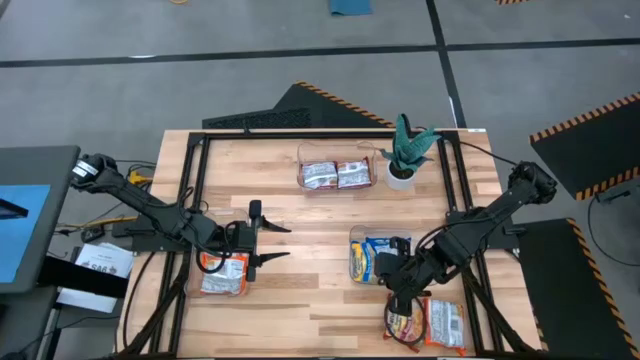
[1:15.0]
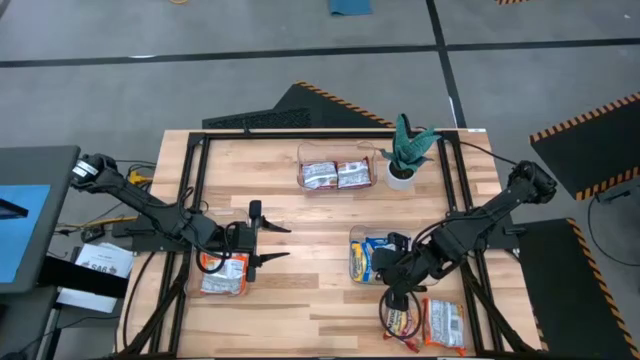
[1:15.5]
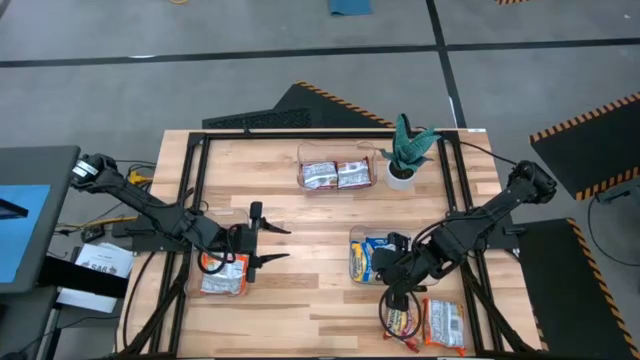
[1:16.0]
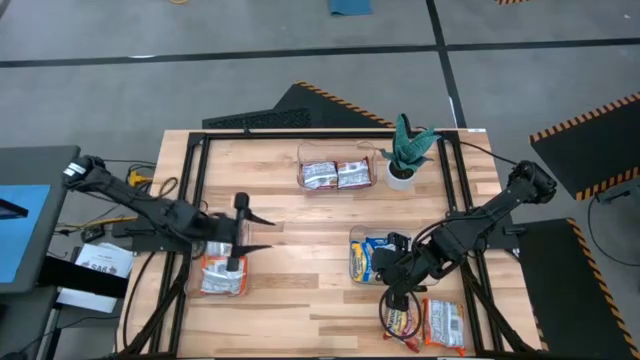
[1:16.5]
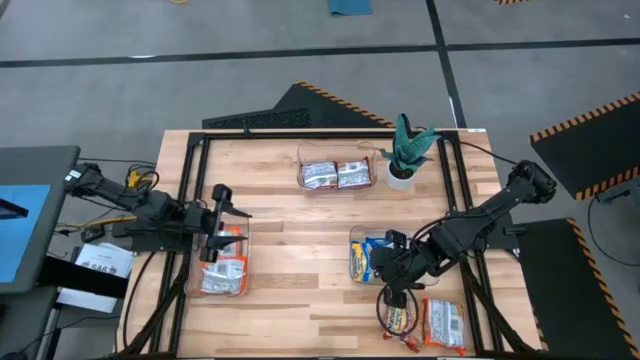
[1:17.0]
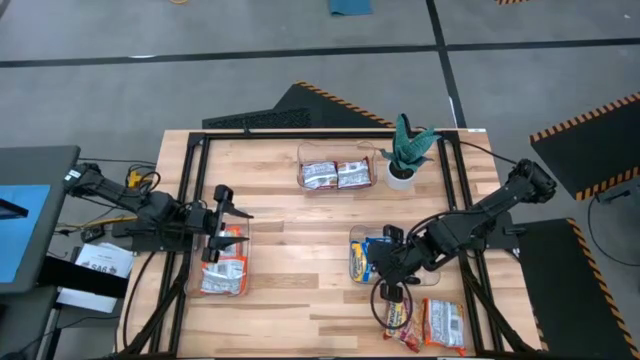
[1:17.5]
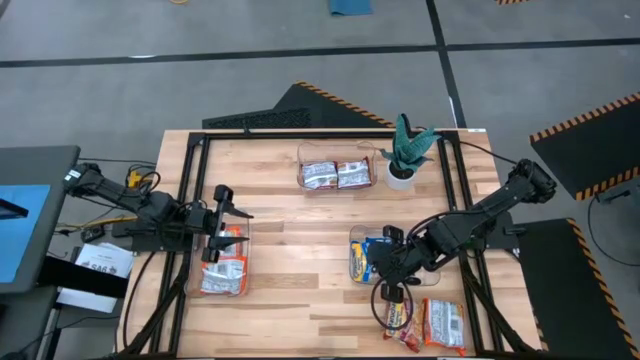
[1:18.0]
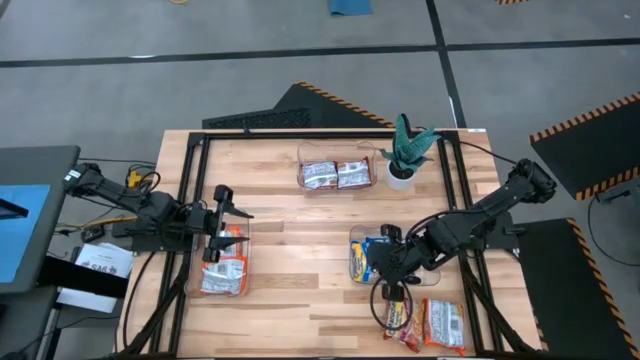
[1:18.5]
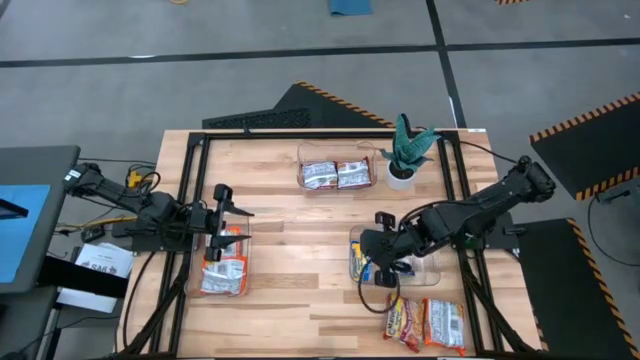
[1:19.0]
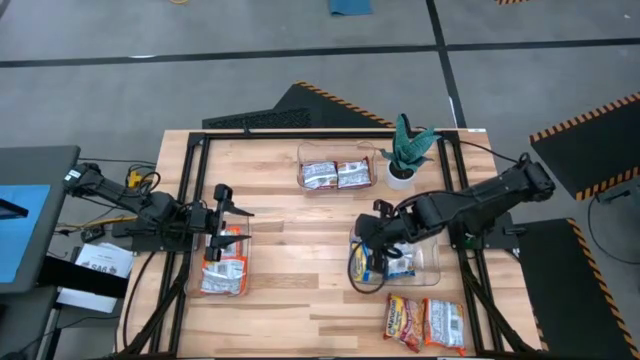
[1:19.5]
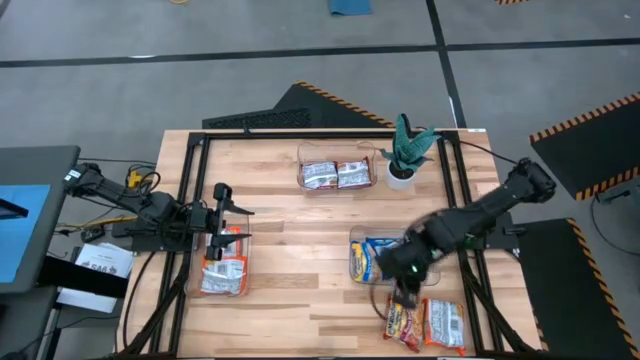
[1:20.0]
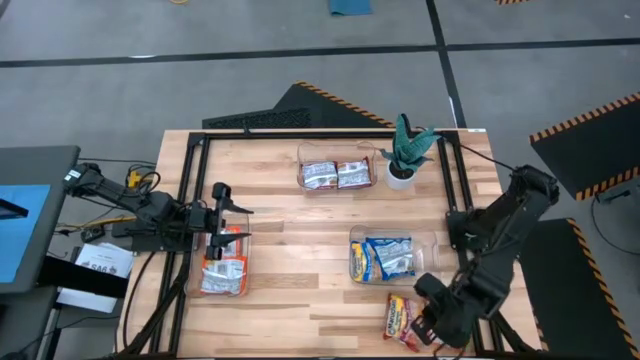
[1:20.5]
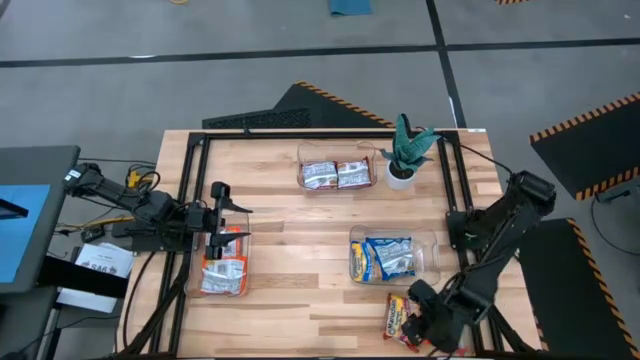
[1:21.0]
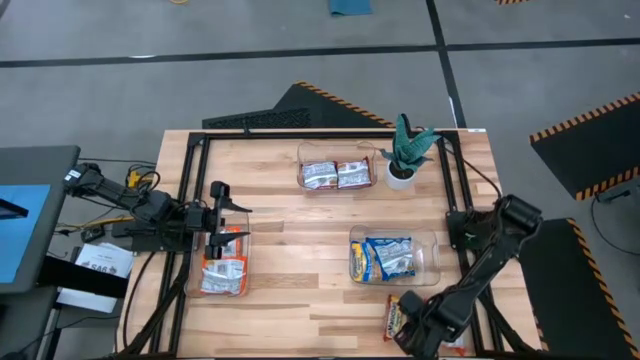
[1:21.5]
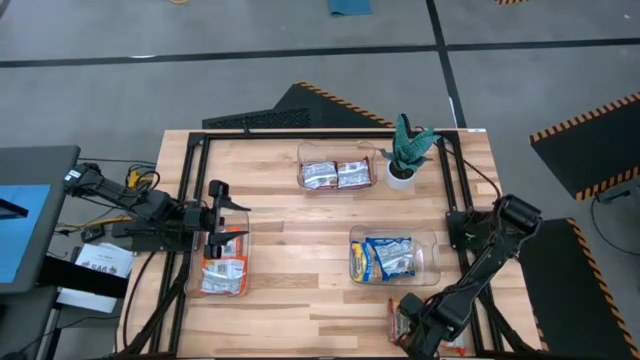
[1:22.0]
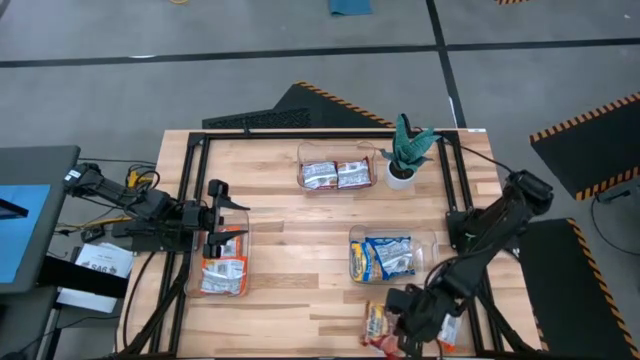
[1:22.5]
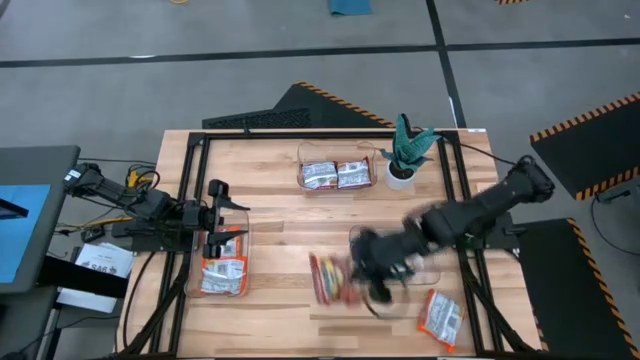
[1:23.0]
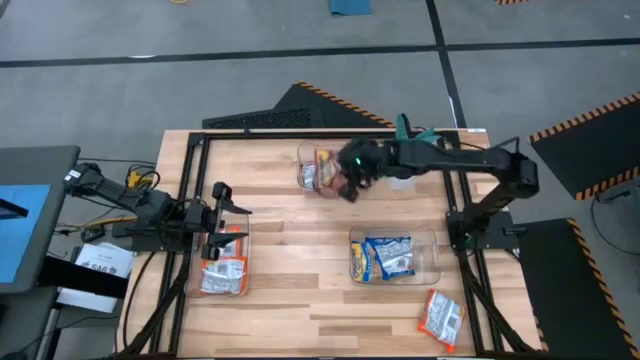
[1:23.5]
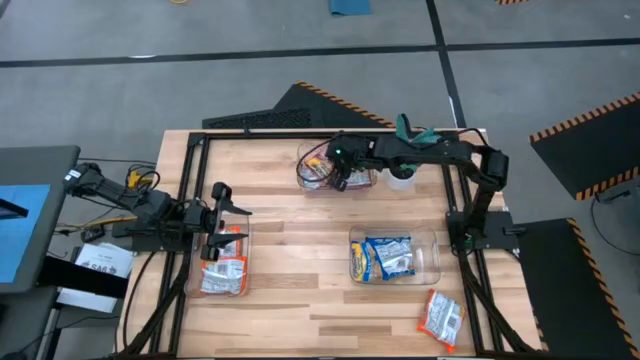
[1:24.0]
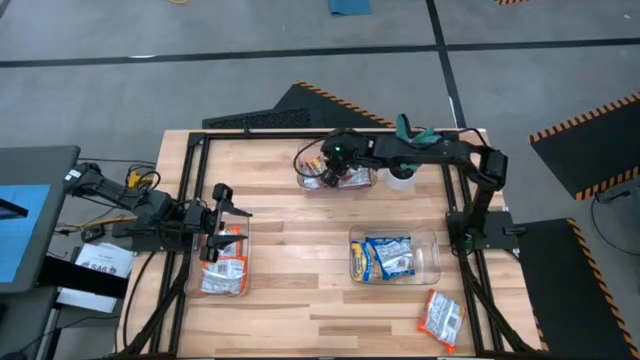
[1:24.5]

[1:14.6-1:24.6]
Task: Sort Maruchan noodles
Put the red bag into the top transparent bin

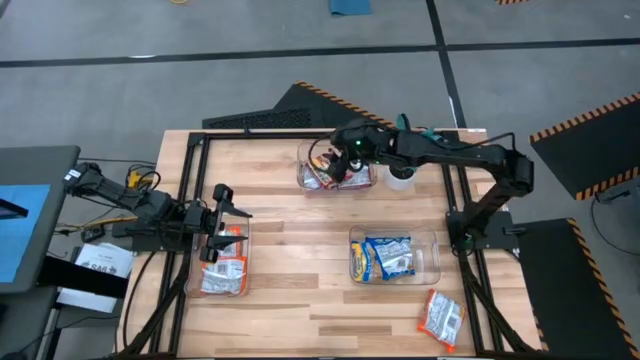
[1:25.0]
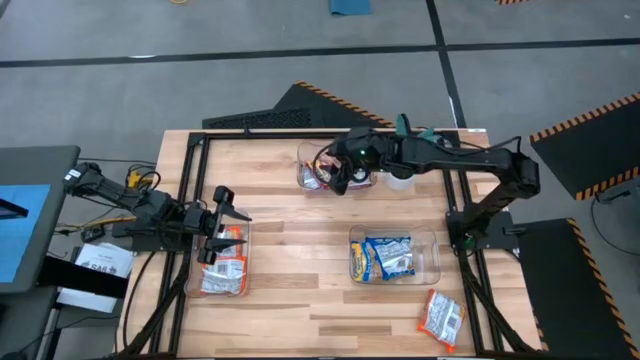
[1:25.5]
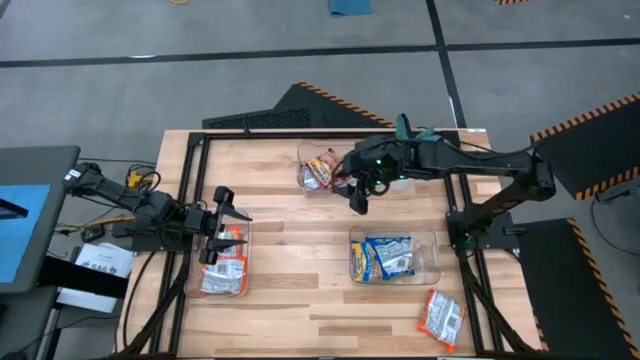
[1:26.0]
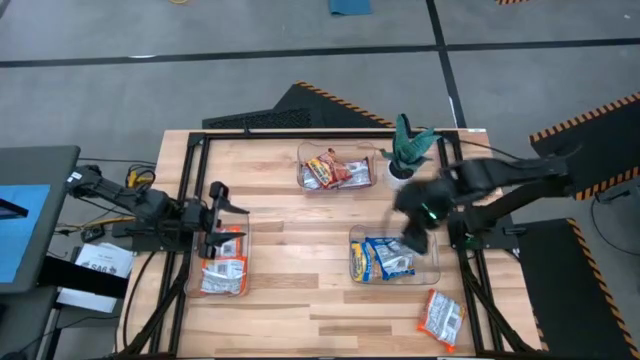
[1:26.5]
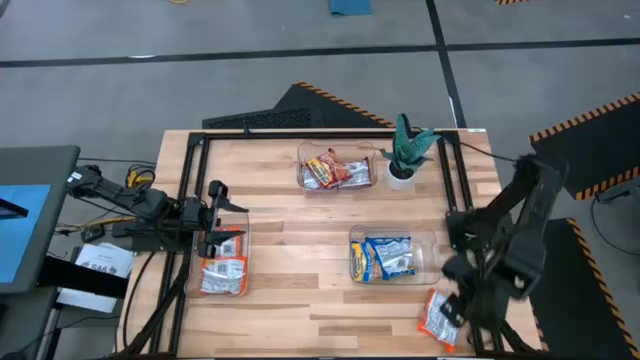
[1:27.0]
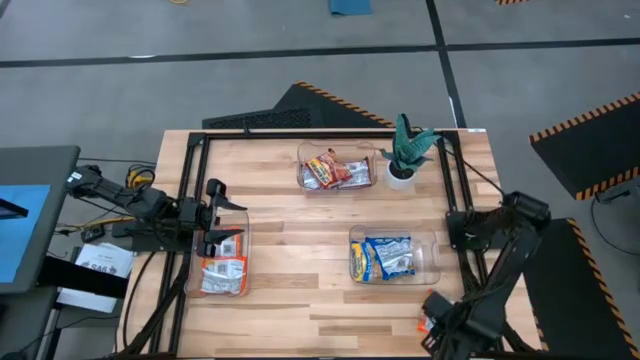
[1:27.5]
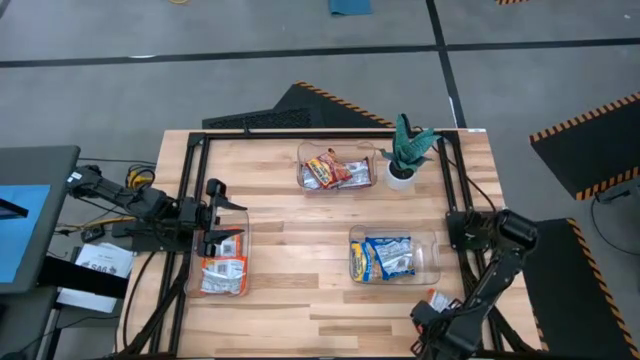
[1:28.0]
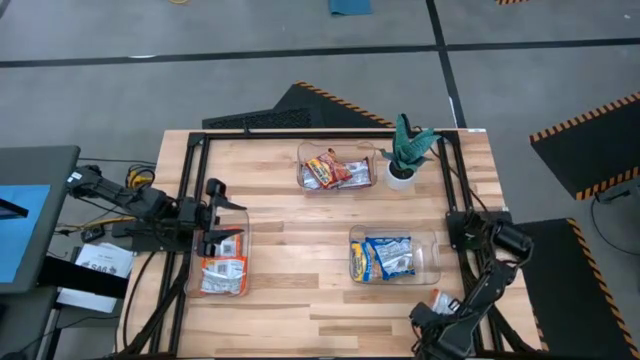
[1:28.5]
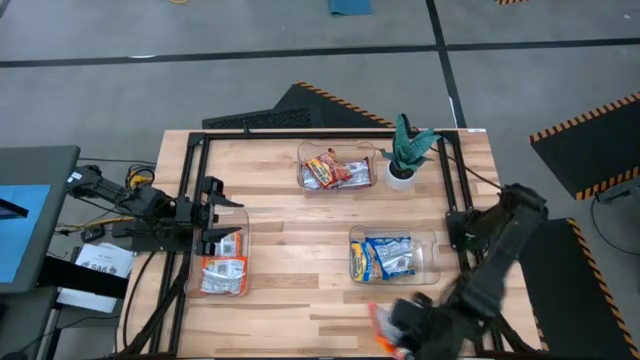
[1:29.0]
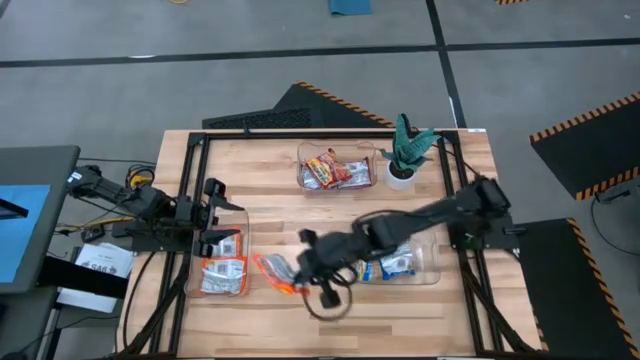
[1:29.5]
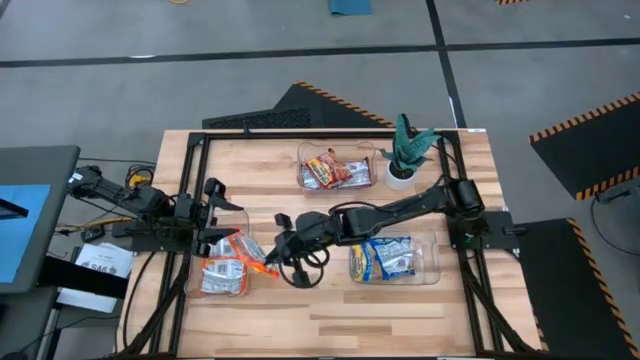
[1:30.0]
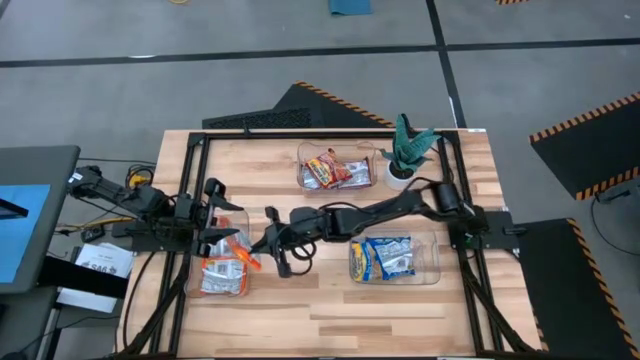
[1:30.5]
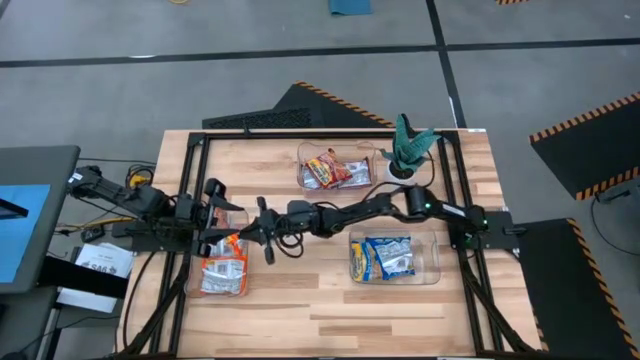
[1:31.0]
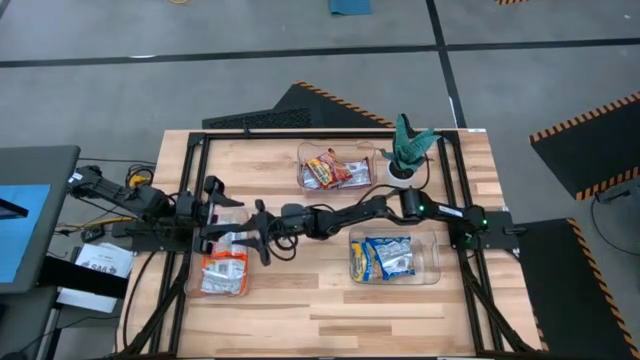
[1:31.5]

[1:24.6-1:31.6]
Put the orange bag into the bottom left transparent bin

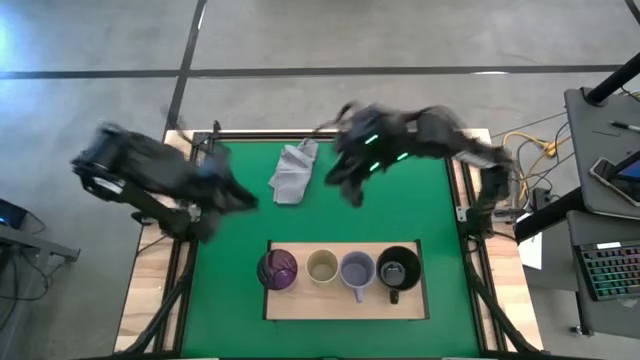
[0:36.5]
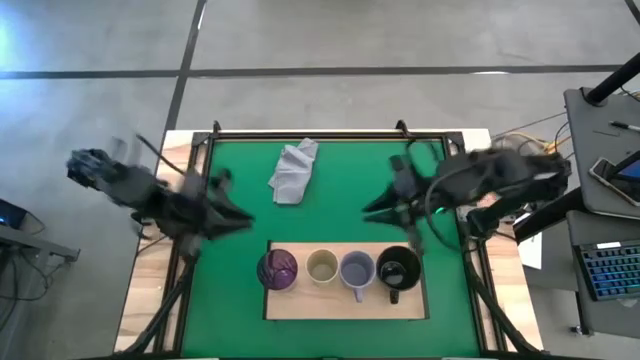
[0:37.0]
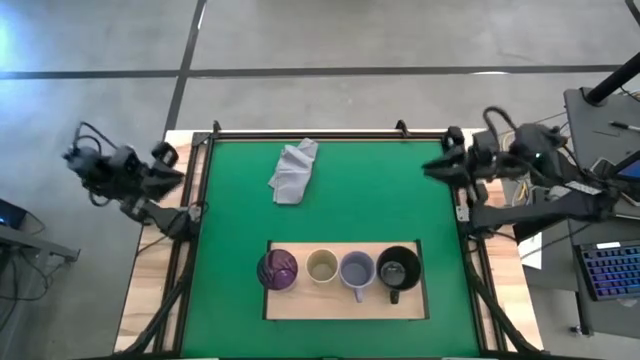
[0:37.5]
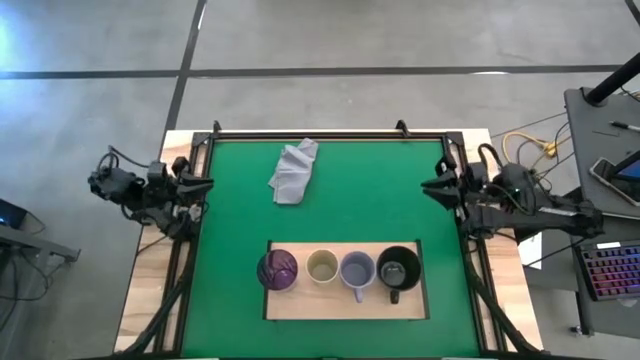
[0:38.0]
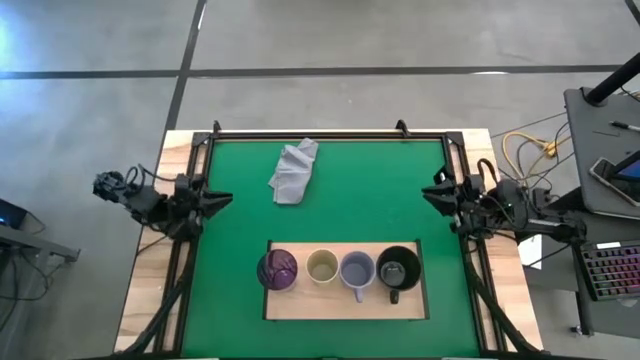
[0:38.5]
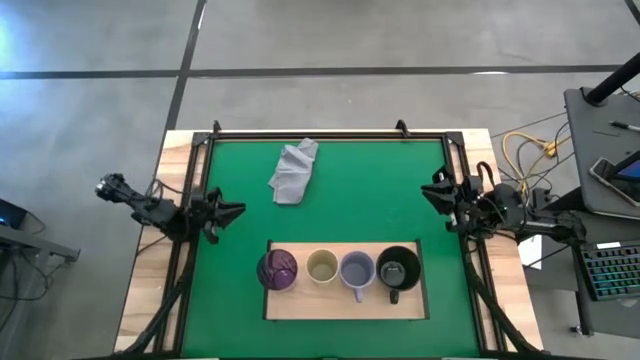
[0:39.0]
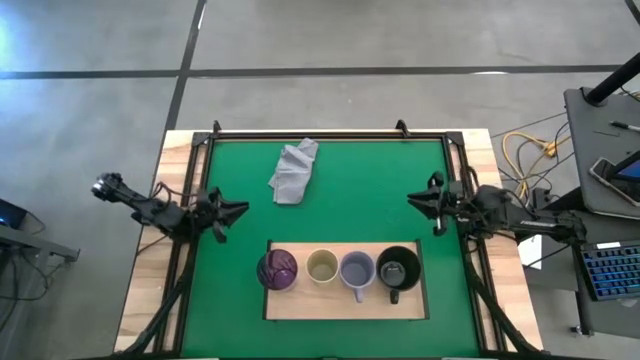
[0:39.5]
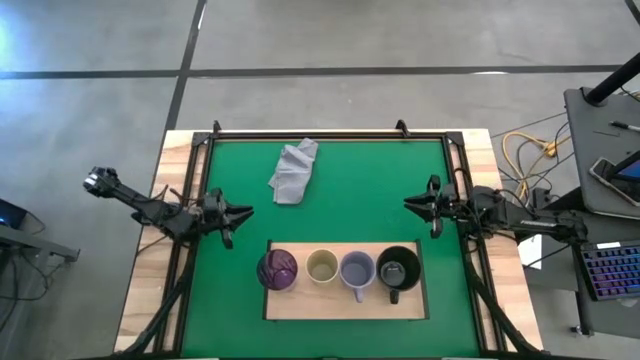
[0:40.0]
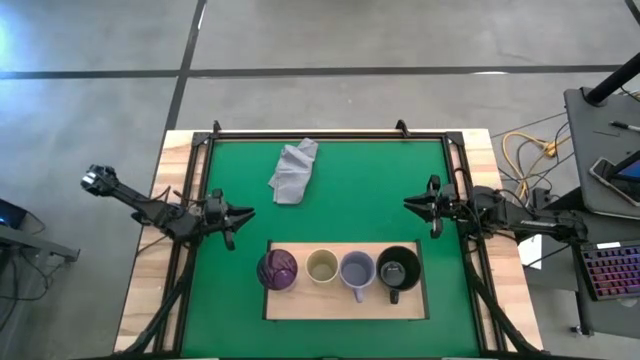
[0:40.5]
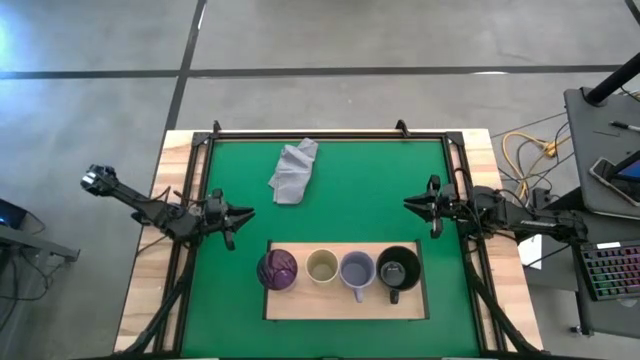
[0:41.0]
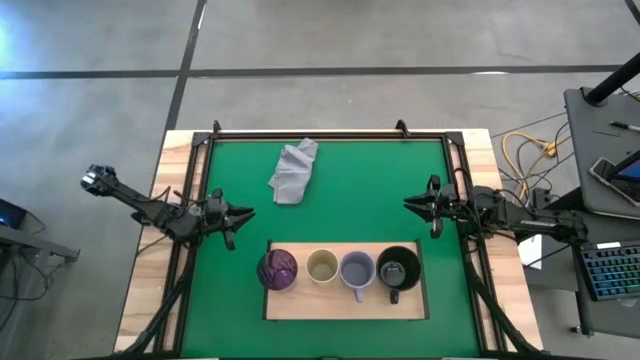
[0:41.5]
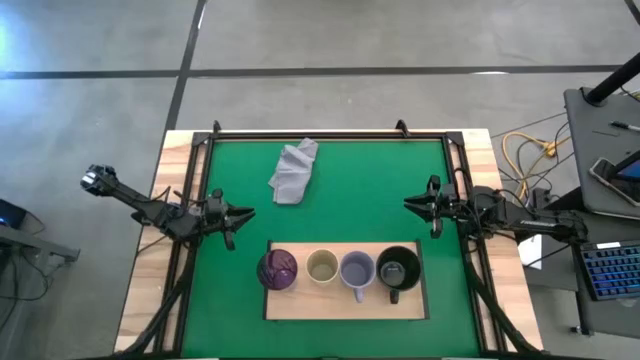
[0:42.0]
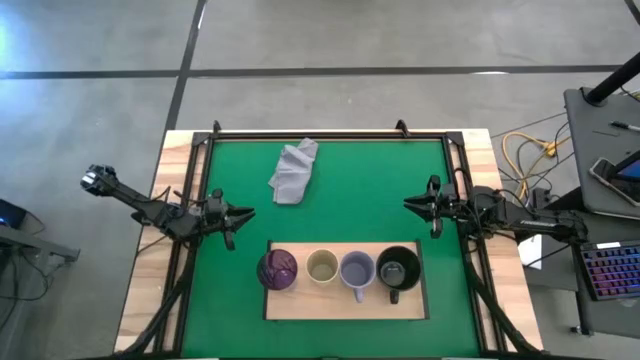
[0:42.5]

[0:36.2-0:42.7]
Task: Stack small to large cups/mugs on shelf
Return to Home Position
